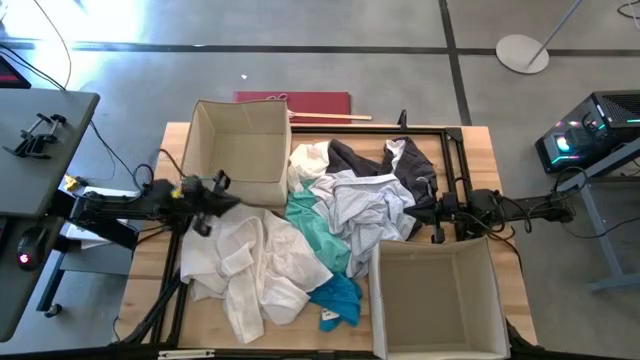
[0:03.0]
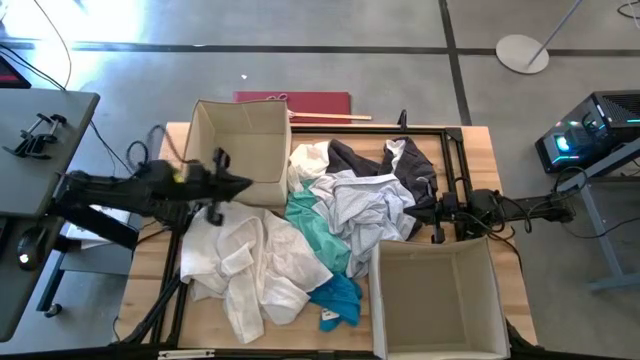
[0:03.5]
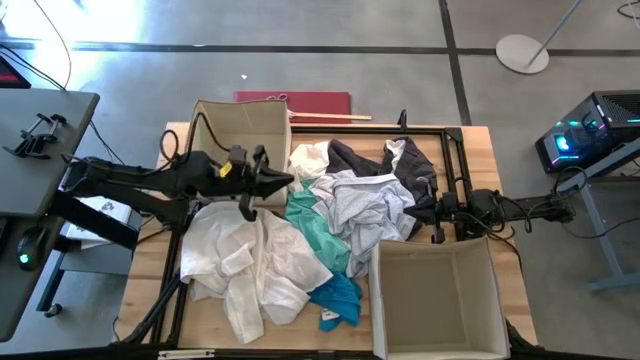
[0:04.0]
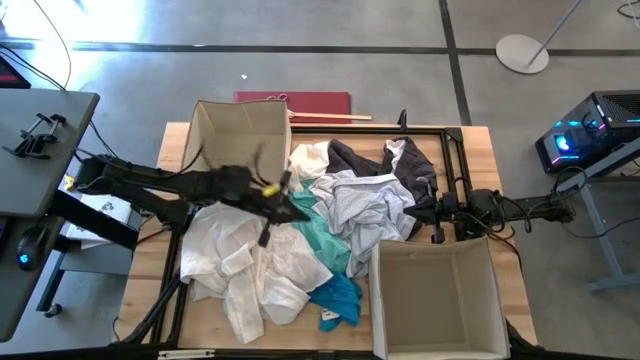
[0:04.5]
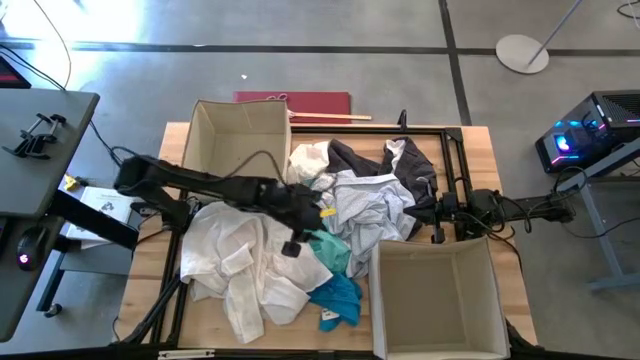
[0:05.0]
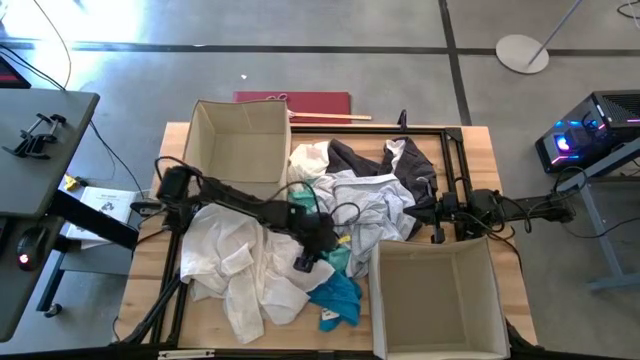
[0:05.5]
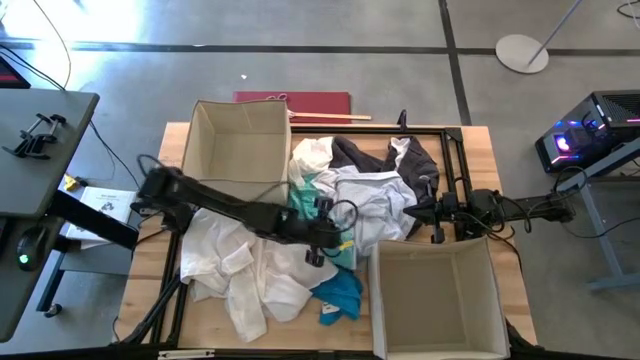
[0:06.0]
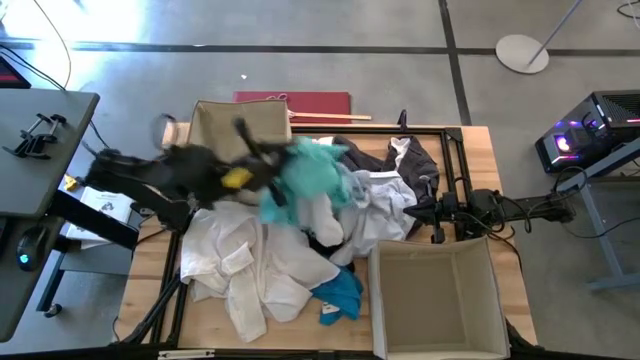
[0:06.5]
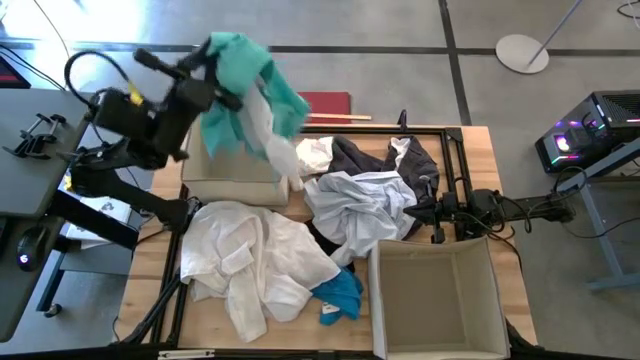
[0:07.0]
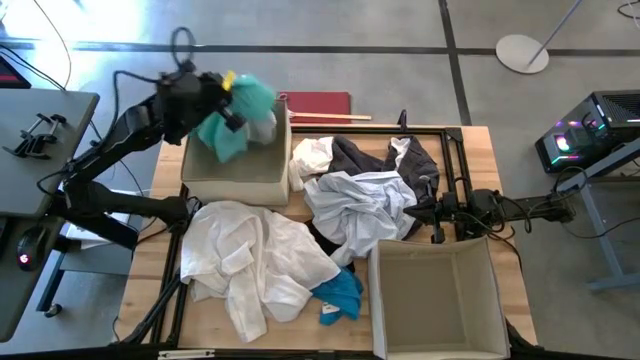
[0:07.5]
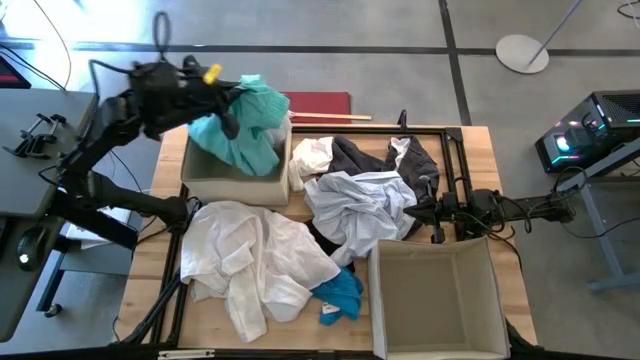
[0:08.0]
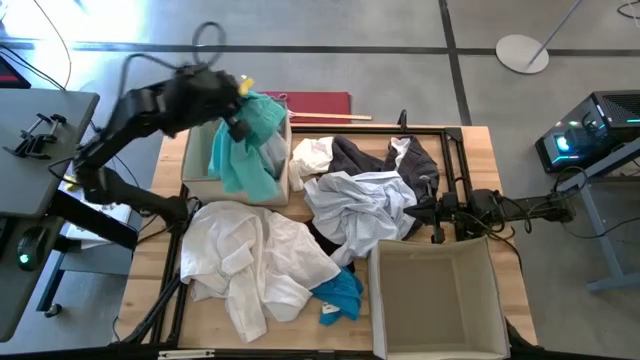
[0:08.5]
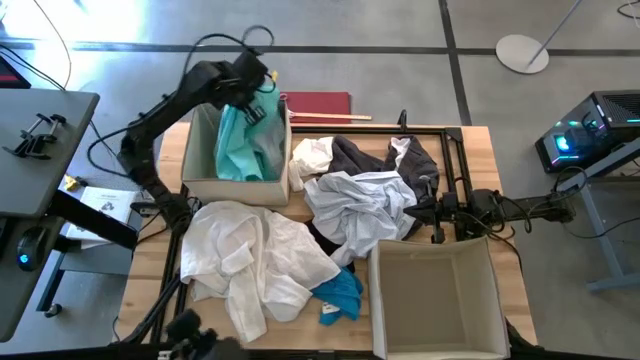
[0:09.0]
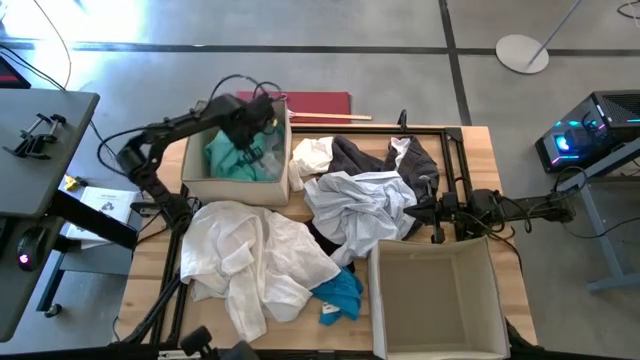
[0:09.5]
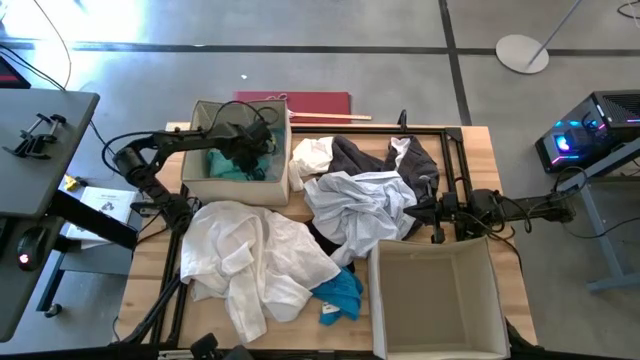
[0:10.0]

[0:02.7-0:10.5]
Task: Sort clothes
Put the light blue shorts into the top laundry organizer

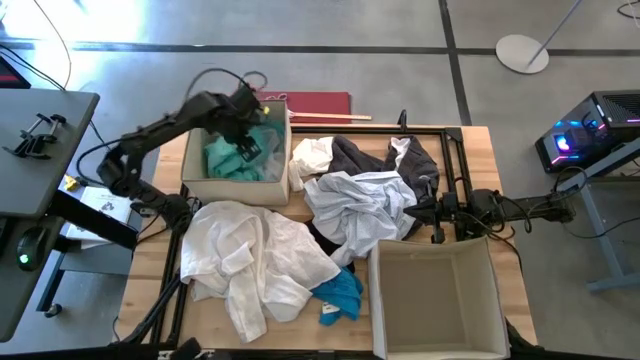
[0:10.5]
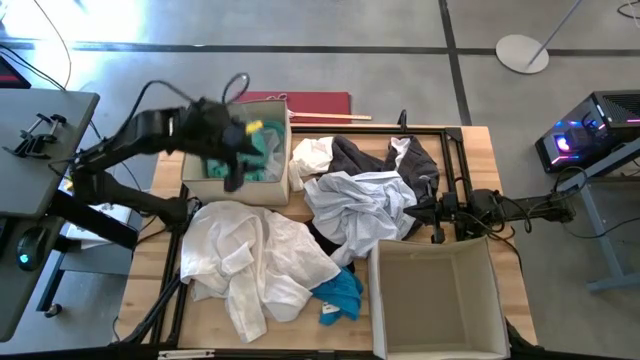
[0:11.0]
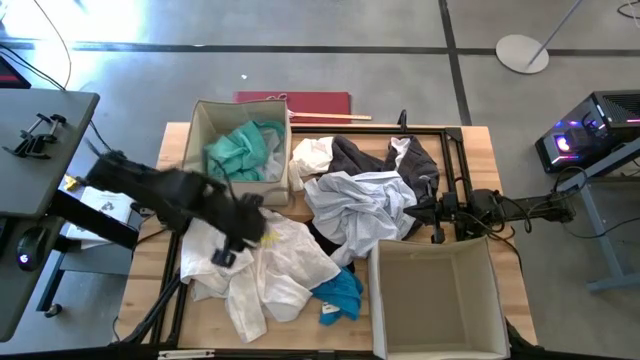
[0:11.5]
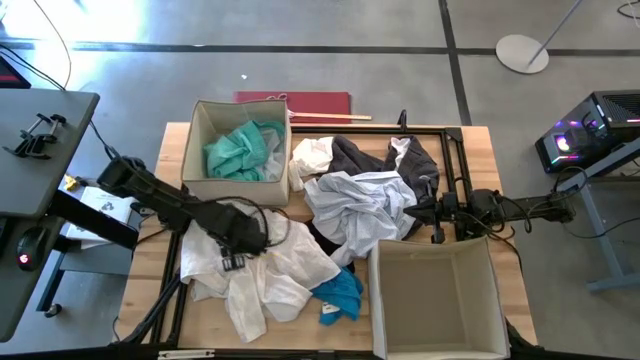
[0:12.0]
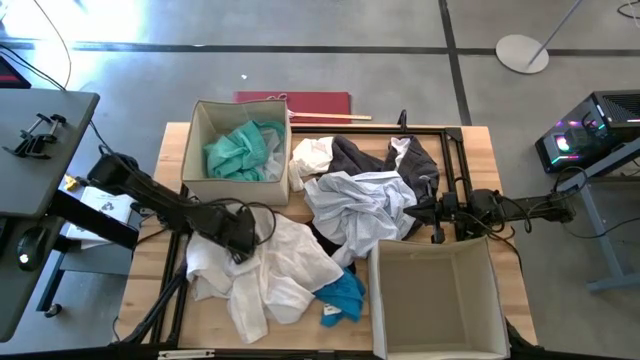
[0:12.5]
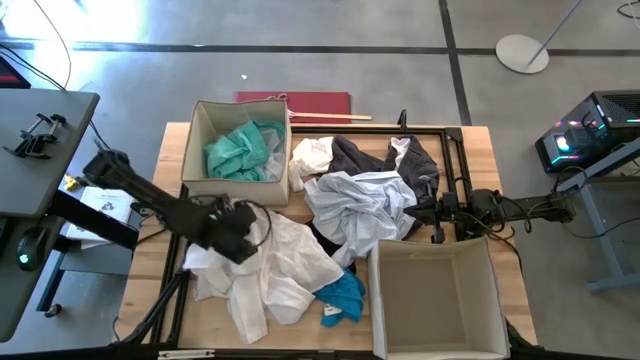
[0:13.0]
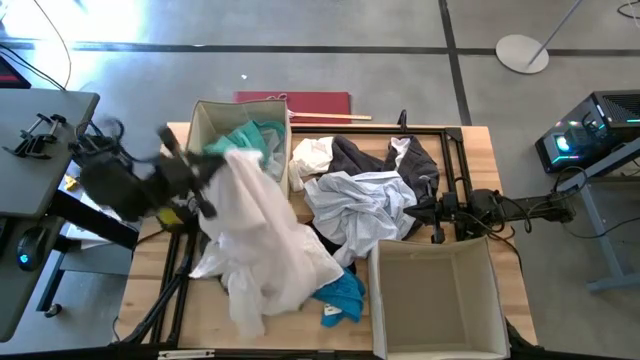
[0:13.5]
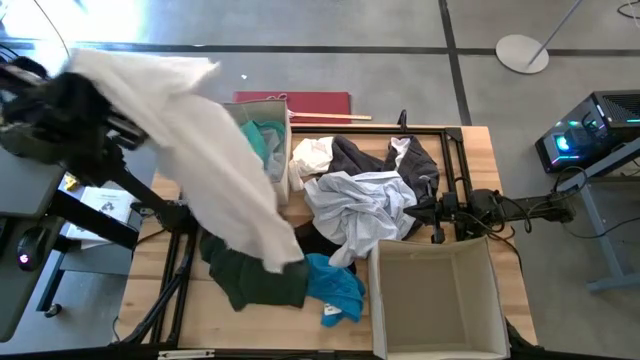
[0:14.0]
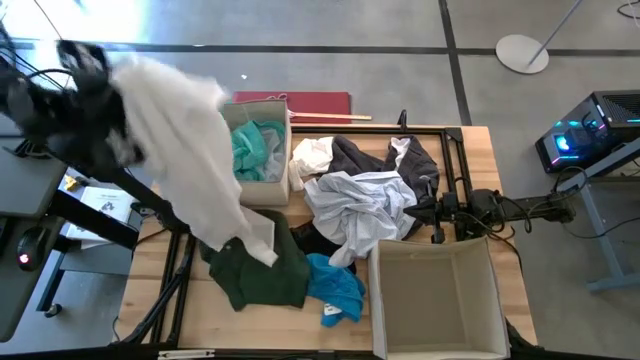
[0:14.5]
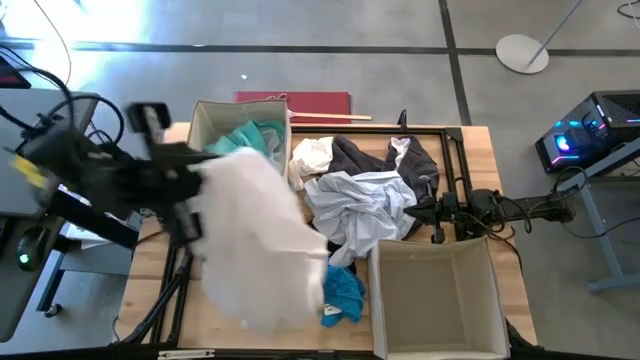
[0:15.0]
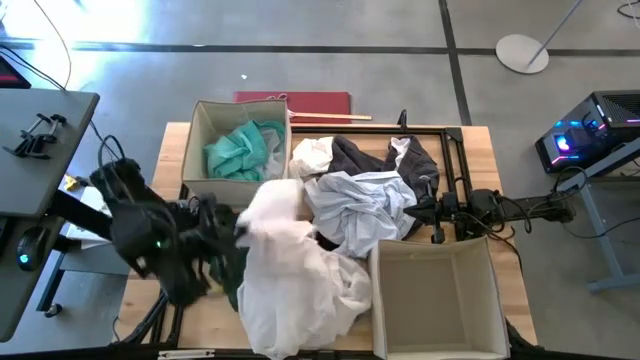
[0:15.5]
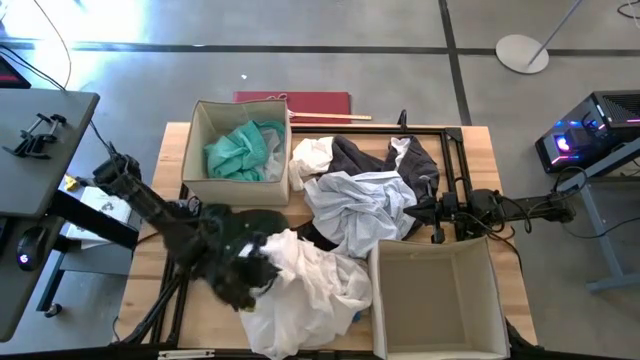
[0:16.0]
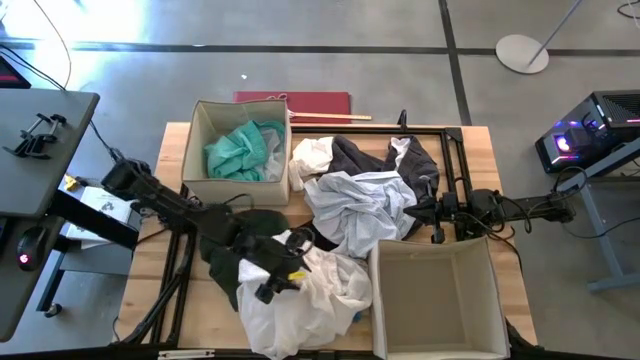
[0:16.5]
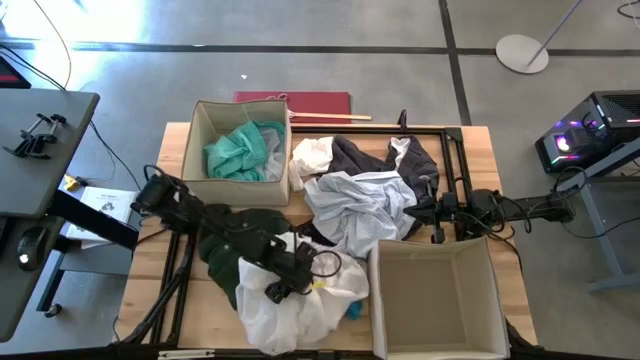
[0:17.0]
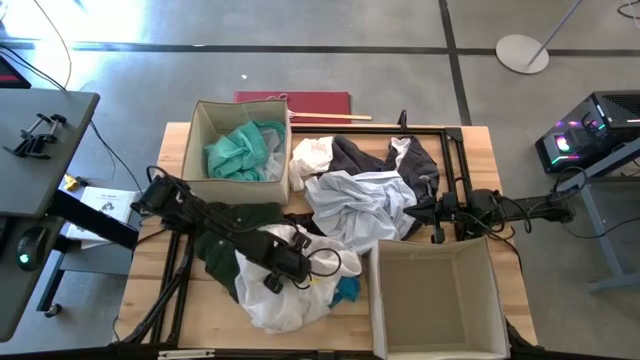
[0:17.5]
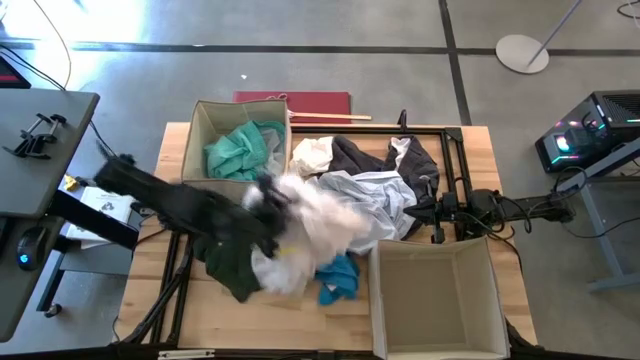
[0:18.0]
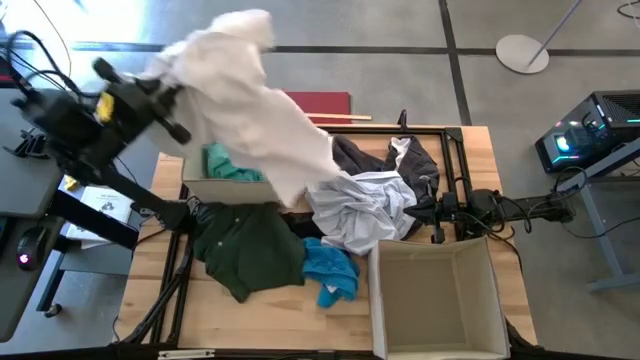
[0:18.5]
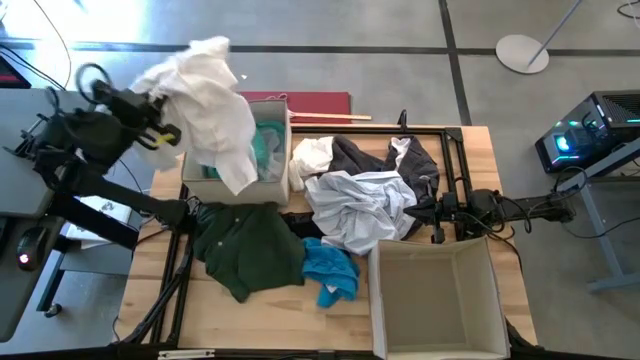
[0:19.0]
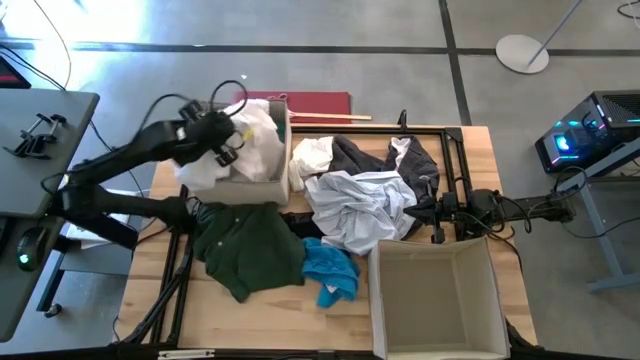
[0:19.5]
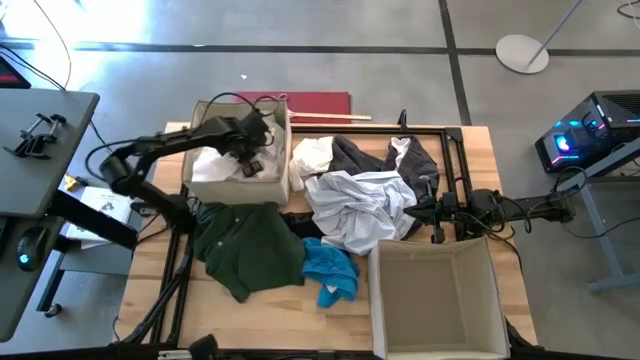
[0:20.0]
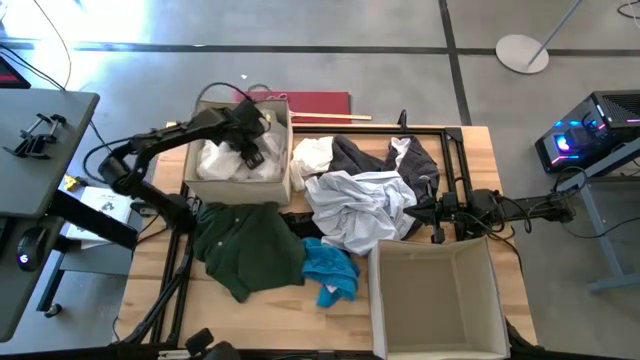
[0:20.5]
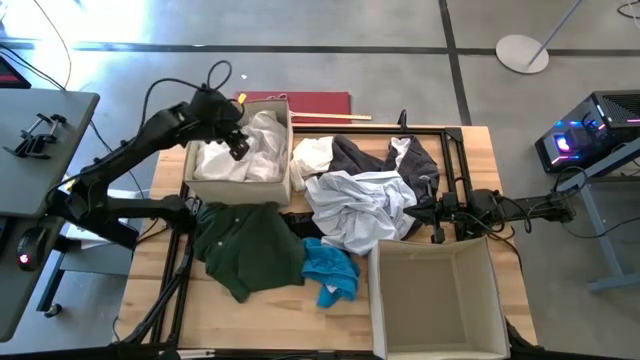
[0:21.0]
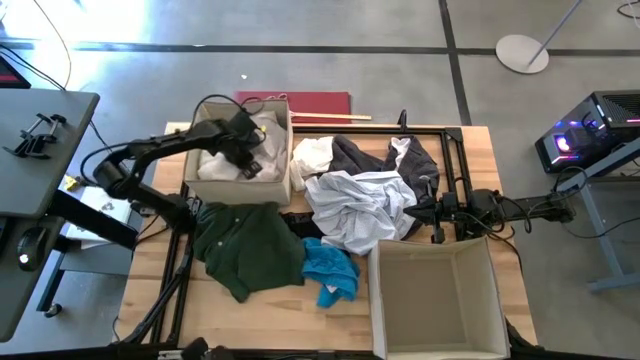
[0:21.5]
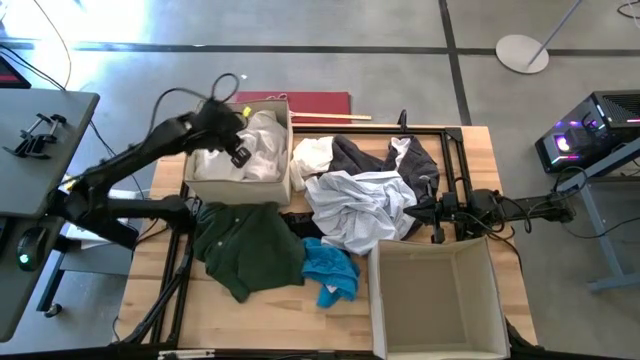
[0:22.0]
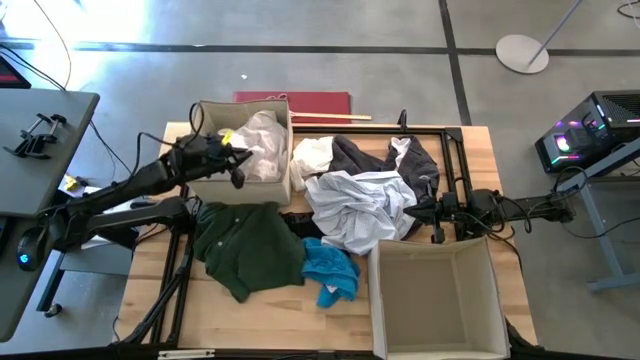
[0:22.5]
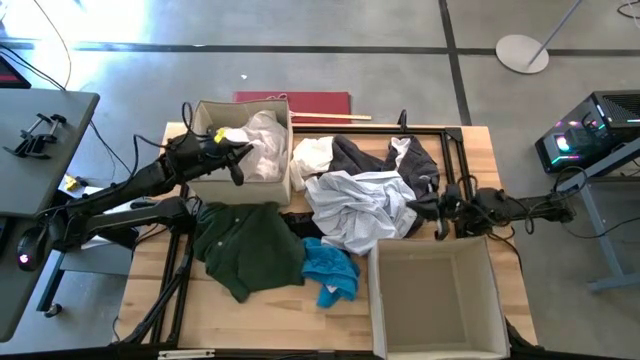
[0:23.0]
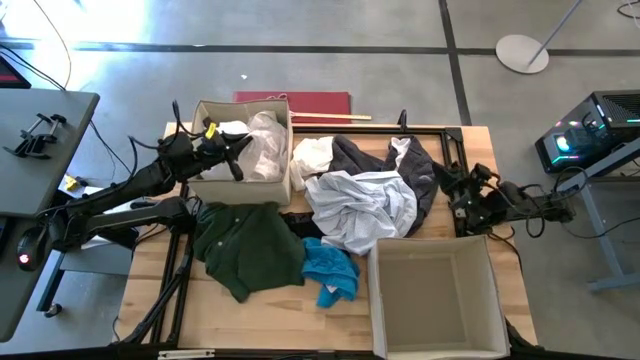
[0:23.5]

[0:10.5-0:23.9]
Put the white polo into the top laundry organizer
